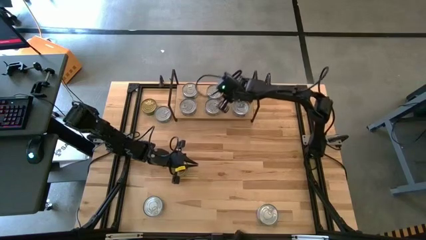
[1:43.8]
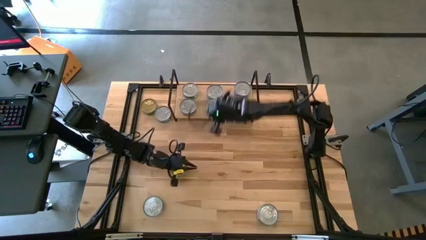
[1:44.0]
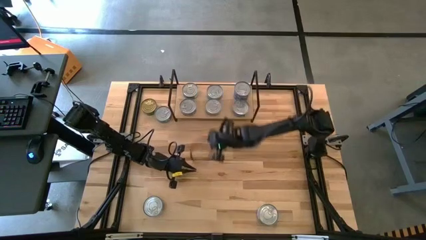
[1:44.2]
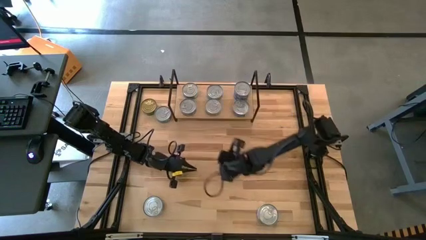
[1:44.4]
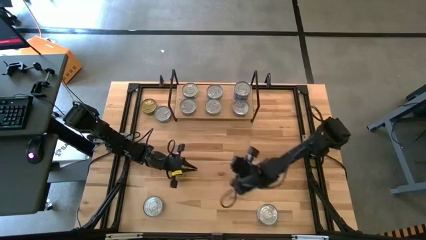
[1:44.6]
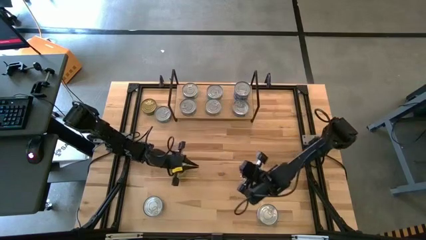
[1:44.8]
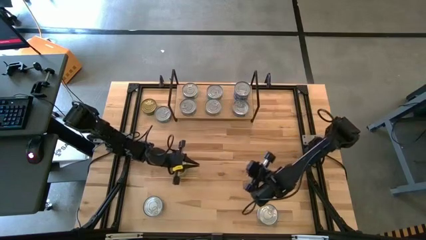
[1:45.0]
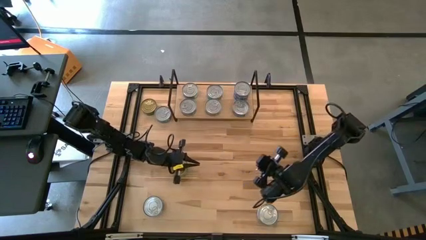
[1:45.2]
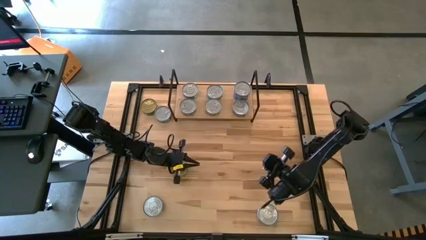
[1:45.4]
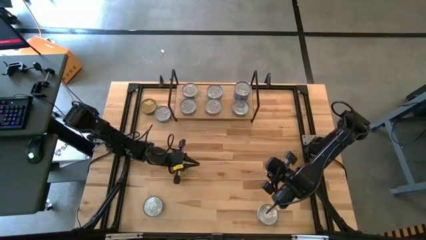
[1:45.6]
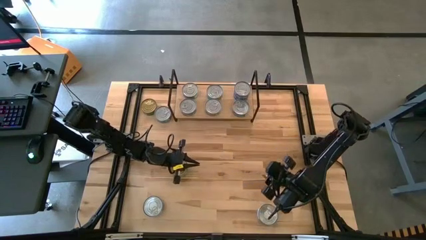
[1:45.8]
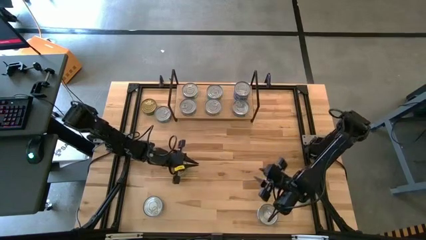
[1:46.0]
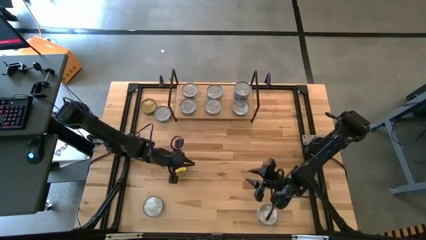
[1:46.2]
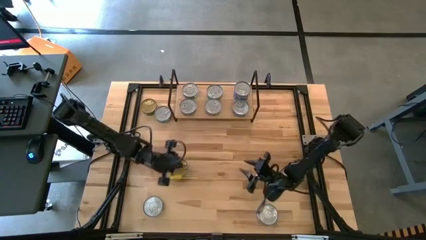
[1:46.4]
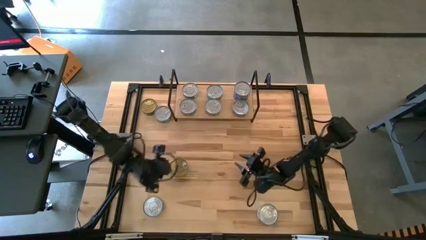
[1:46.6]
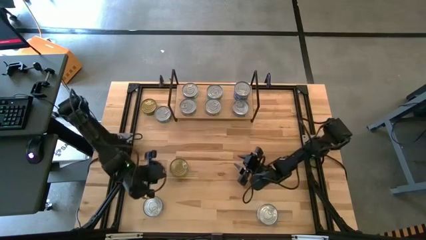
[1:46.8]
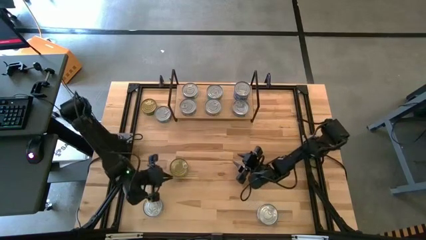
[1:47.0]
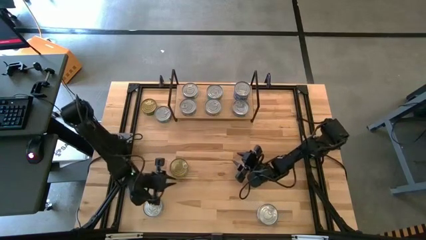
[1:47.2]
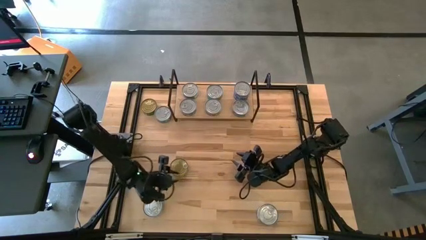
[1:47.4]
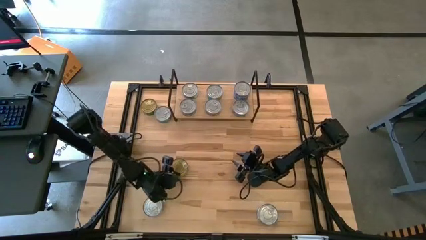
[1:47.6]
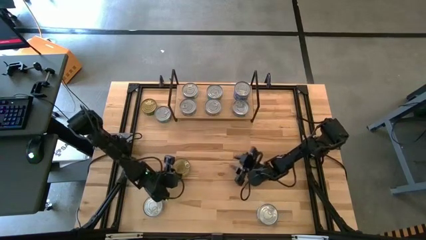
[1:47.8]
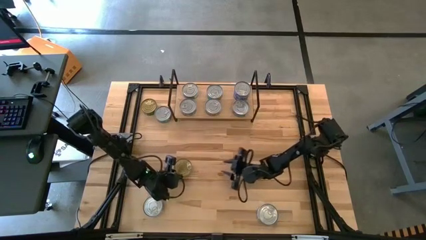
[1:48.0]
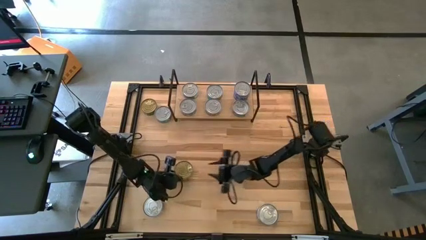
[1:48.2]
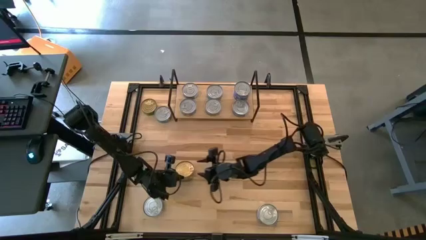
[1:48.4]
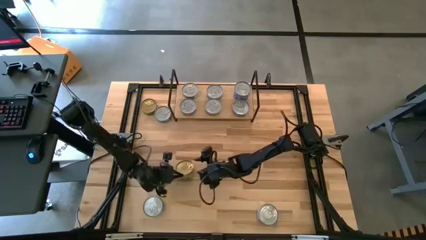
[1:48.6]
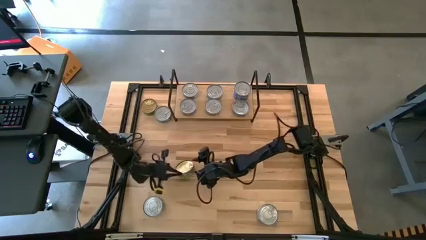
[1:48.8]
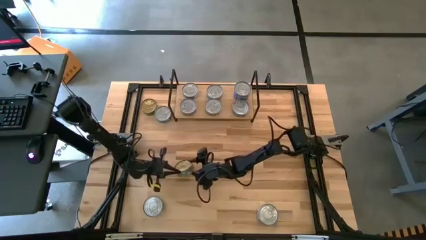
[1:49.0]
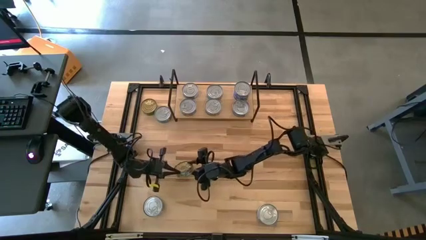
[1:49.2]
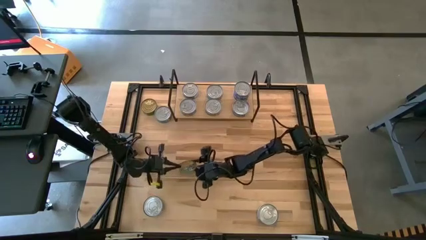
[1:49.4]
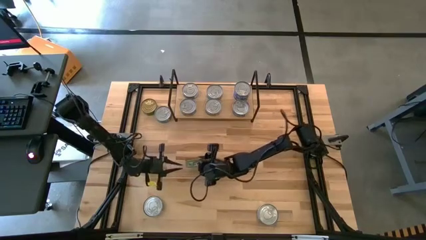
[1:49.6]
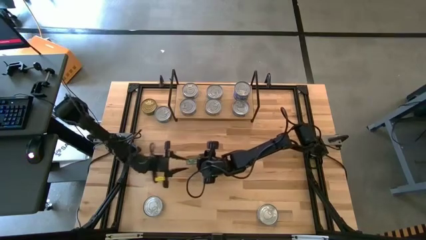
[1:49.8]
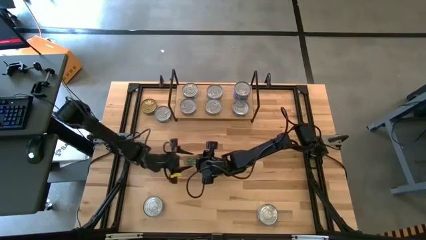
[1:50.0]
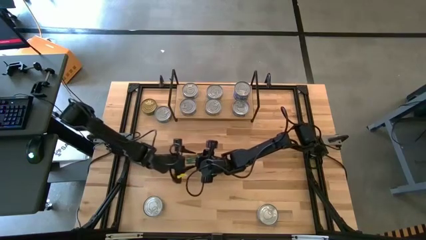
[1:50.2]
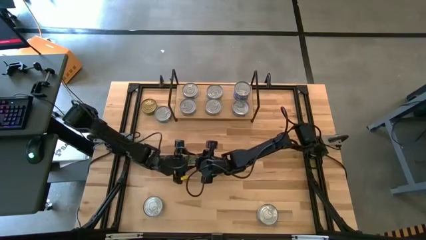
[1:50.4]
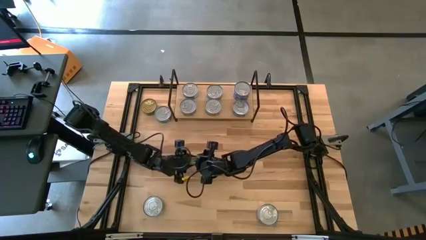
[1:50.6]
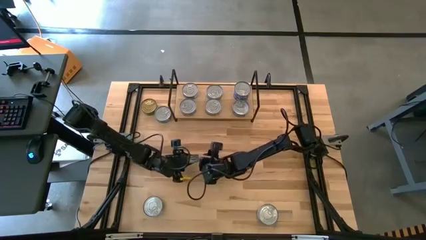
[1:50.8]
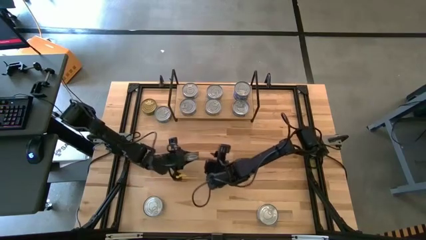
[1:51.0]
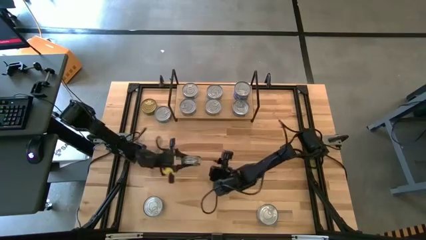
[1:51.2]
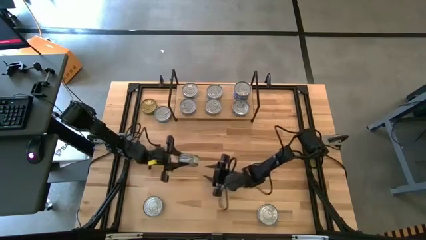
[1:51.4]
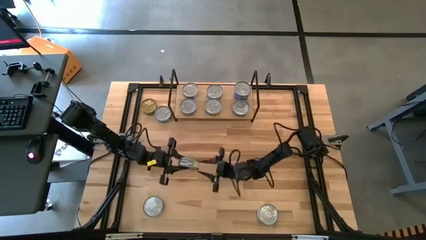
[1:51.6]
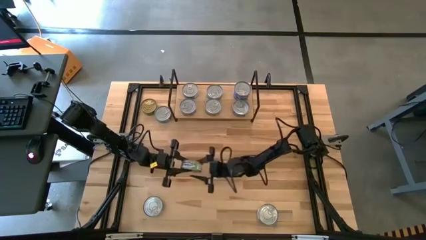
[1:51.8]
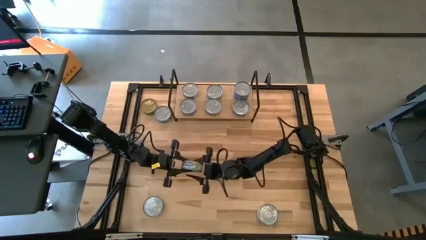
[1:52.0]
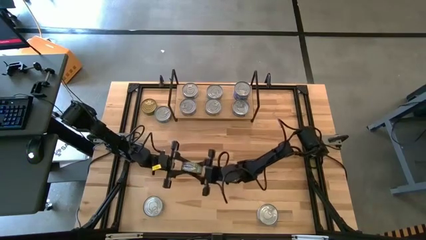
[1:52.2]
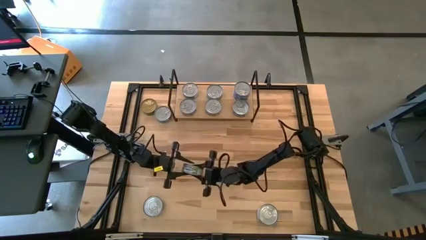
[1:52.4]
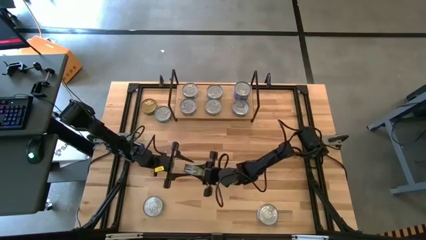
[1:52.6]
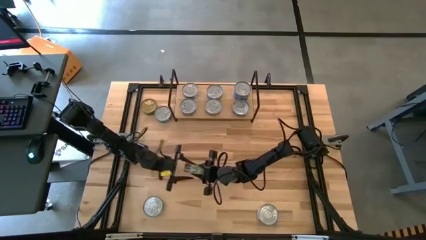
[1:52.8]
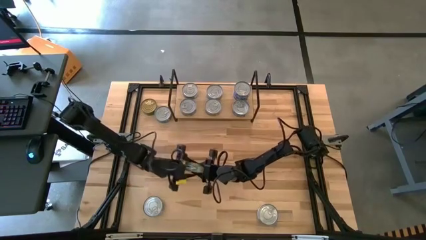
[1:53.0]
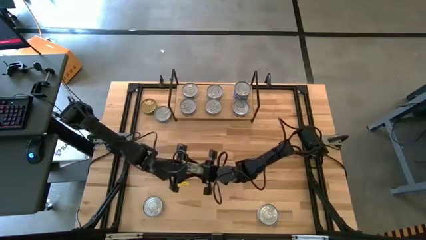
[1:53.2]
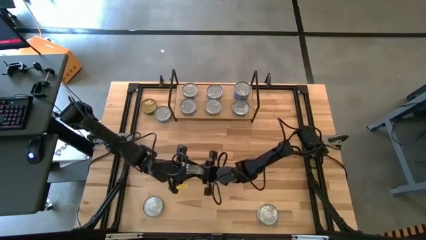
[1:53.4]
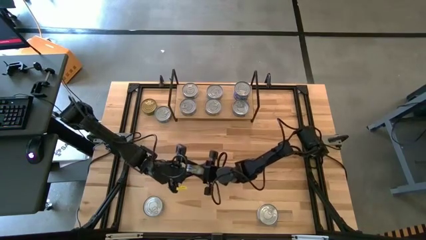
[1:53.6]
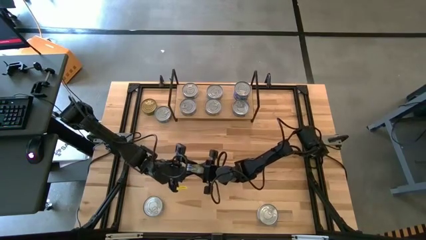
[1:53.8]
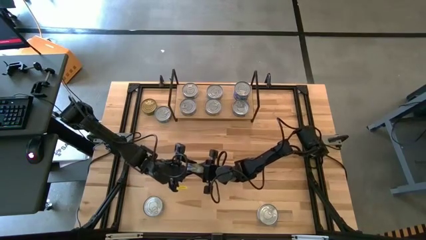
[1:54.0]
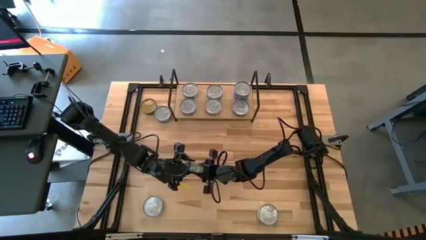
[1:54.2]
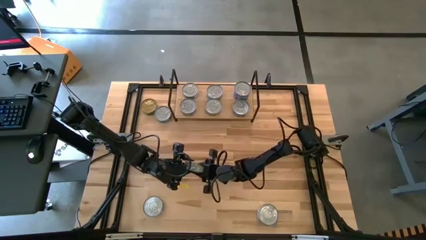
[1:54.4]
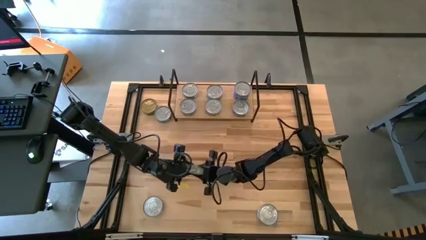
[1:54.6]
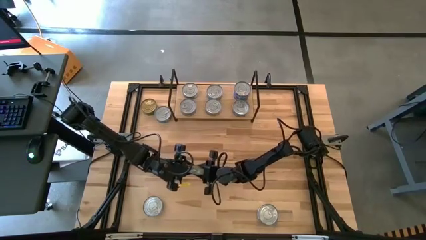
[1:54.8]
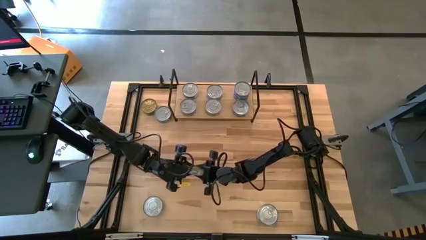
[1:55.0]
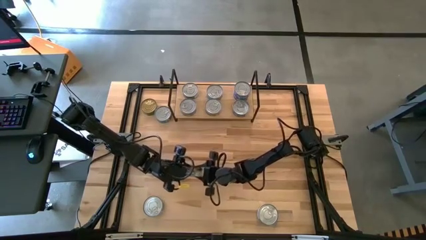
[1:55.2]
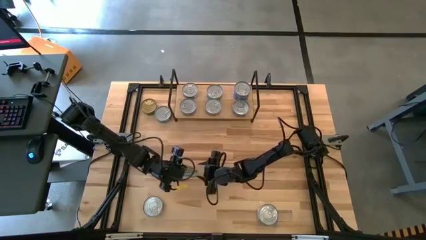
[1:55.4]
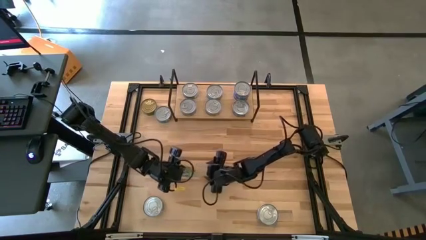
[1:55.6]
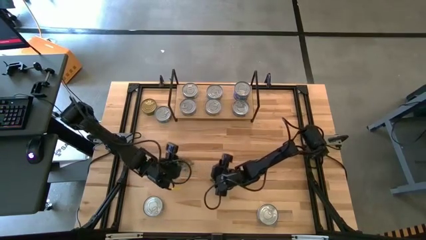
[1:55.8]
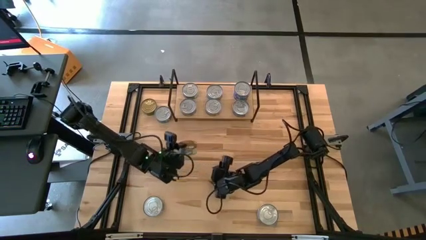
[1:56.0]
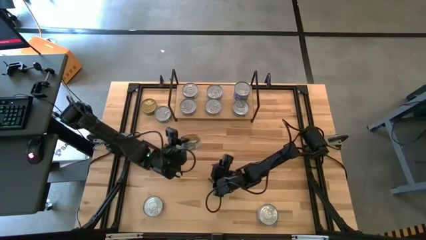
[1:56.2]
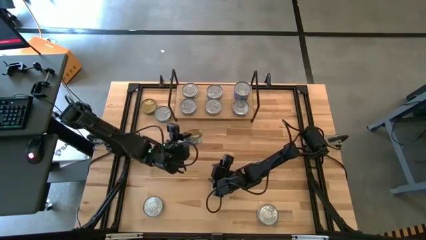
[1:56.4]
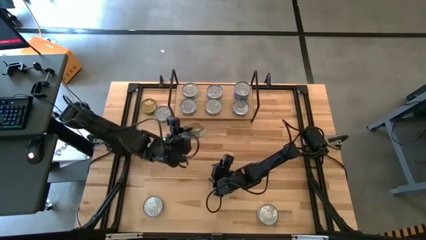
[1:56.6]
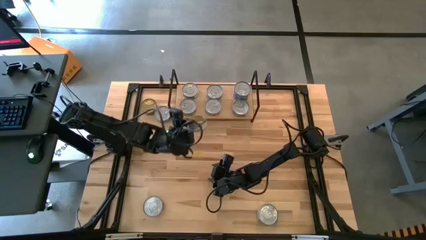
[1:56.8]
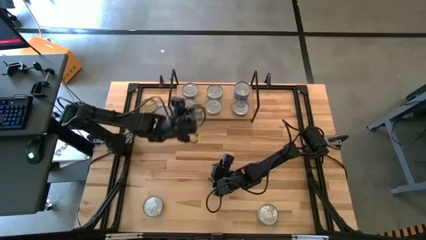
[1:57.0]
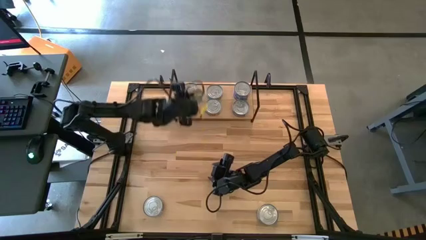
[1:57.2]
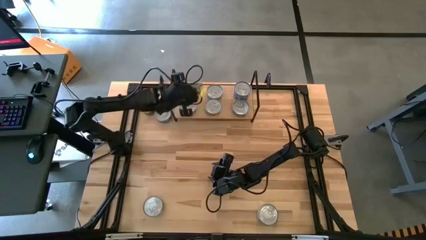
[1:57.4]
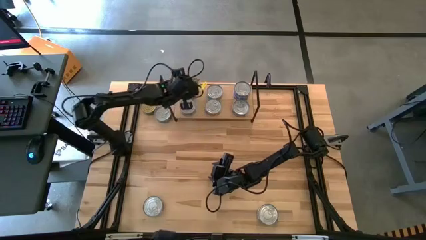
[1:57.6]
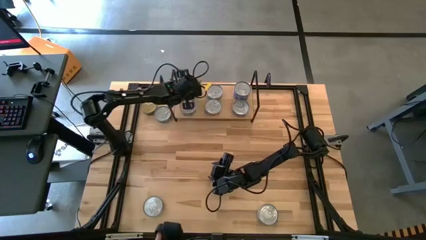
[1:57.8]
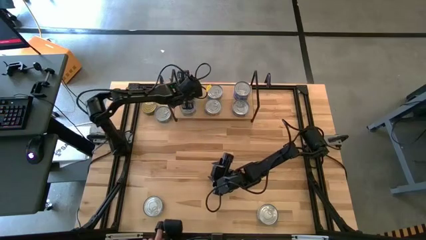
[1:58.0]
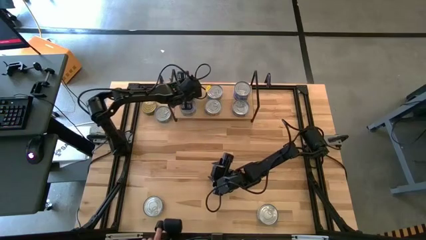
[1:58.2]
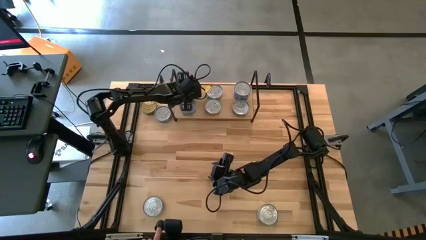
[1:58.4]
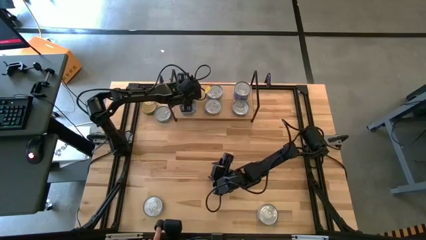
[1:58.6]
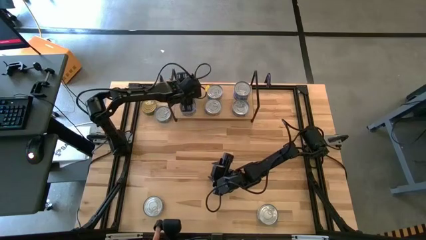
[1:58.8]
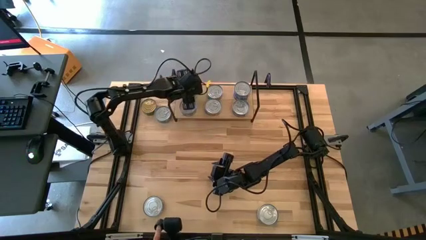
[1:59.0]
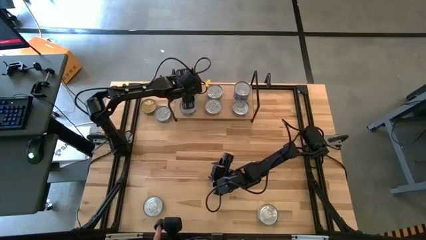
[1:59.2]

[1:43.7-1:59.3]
Task: Stack canned seafood by type on shelf
Stack the green tuna can on top of the green tuna can on the shelf
